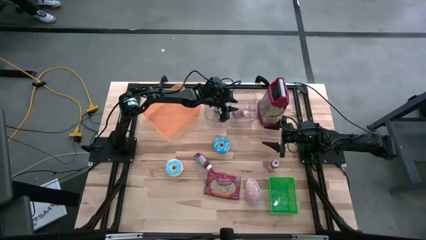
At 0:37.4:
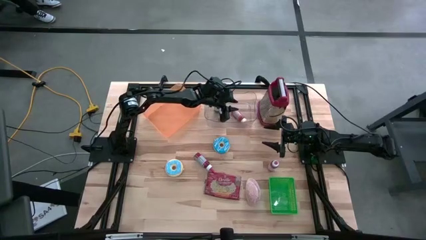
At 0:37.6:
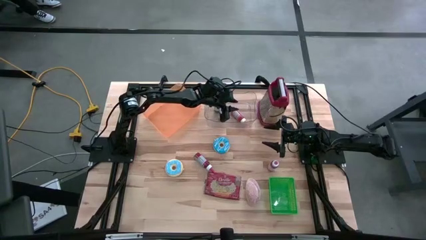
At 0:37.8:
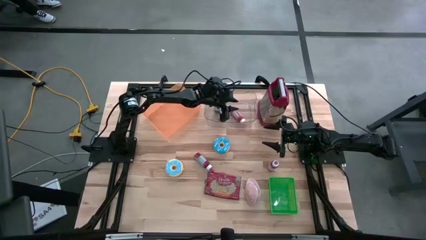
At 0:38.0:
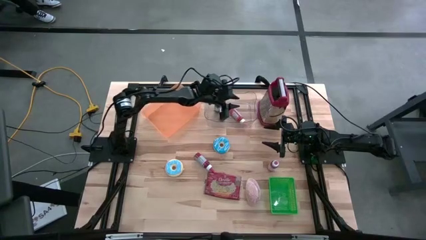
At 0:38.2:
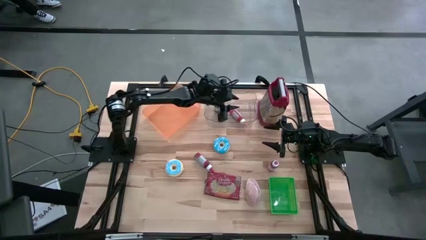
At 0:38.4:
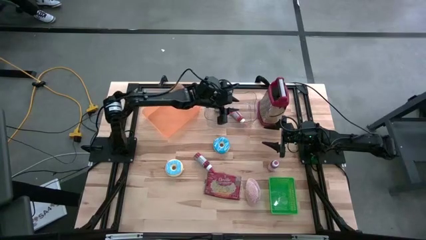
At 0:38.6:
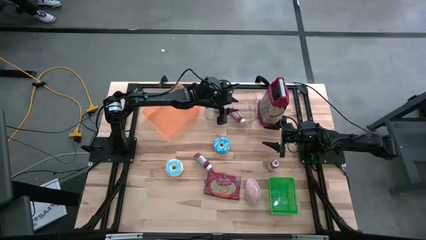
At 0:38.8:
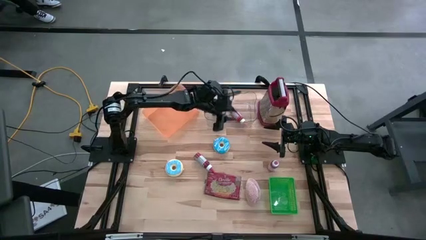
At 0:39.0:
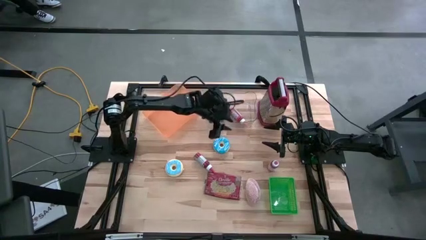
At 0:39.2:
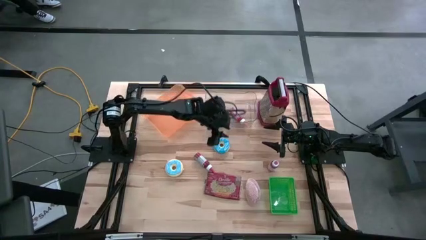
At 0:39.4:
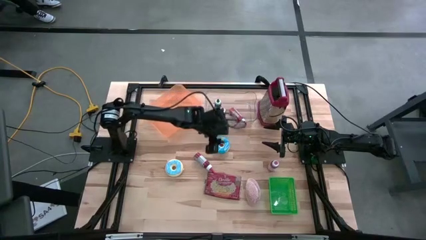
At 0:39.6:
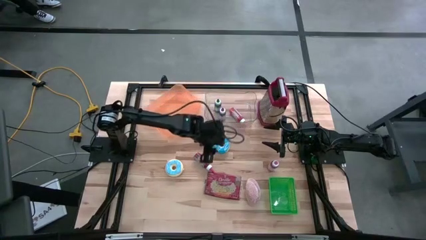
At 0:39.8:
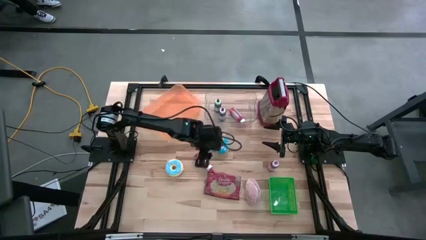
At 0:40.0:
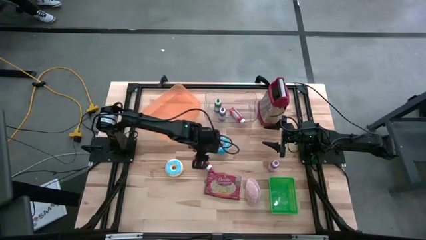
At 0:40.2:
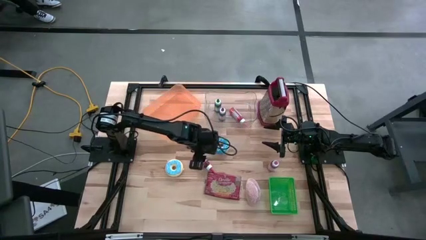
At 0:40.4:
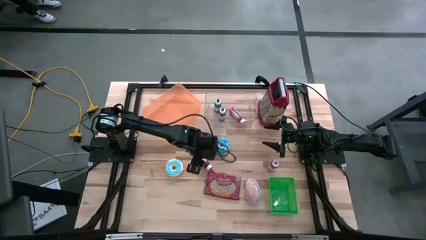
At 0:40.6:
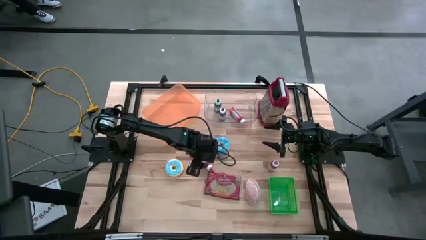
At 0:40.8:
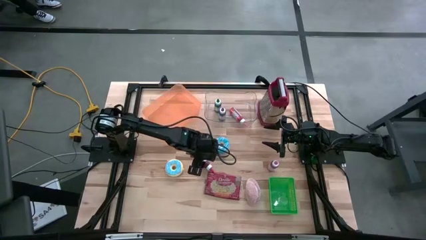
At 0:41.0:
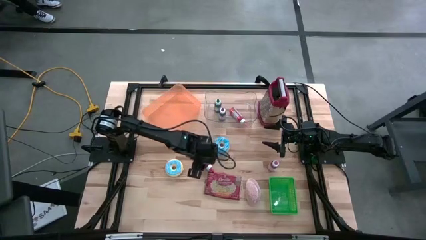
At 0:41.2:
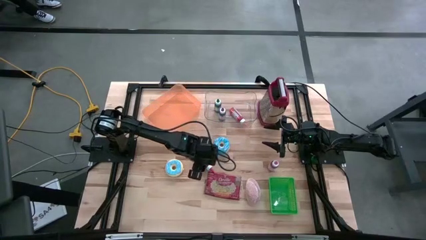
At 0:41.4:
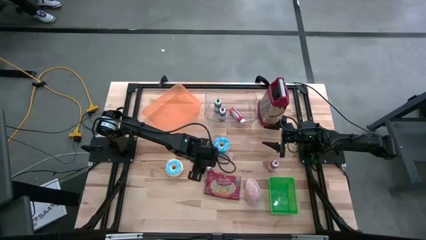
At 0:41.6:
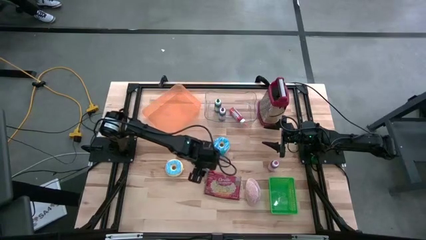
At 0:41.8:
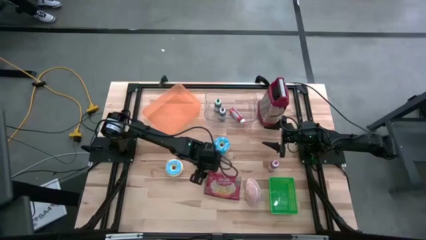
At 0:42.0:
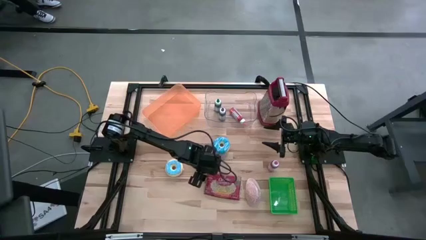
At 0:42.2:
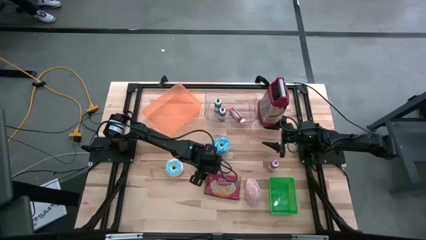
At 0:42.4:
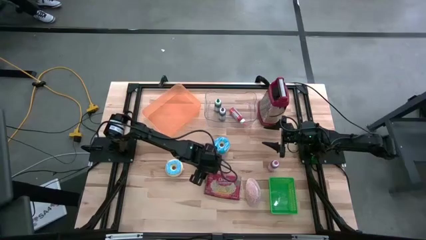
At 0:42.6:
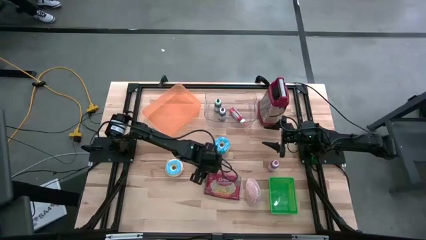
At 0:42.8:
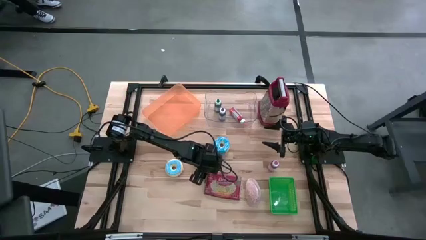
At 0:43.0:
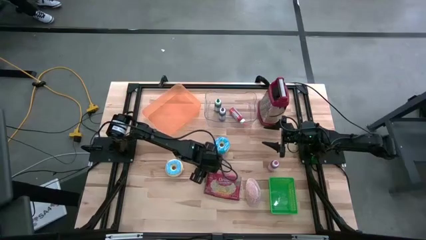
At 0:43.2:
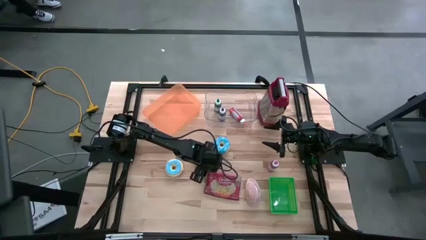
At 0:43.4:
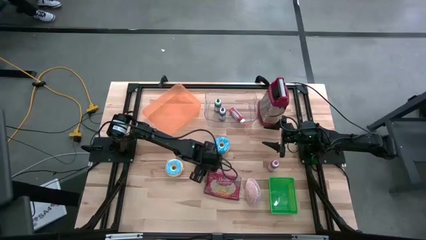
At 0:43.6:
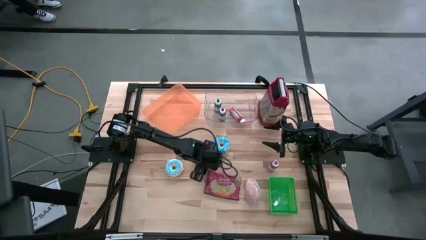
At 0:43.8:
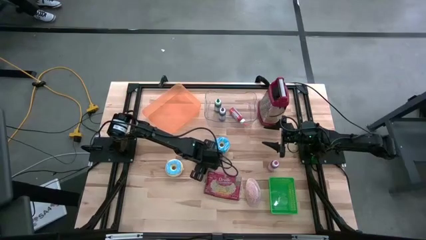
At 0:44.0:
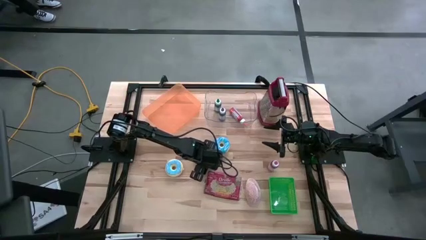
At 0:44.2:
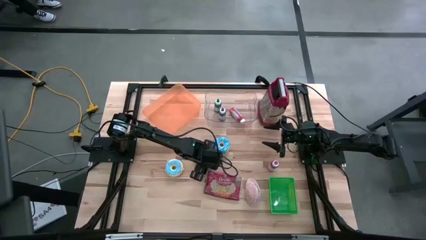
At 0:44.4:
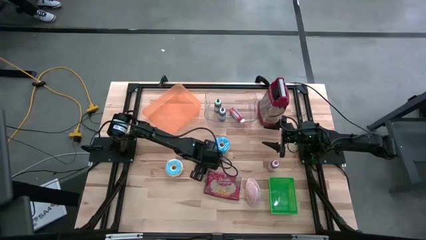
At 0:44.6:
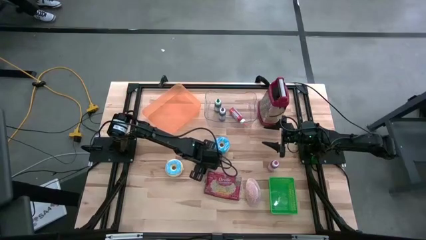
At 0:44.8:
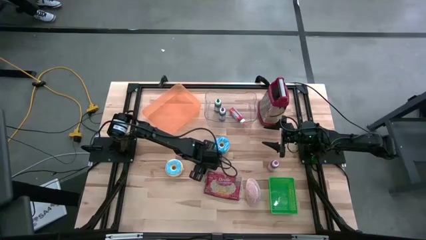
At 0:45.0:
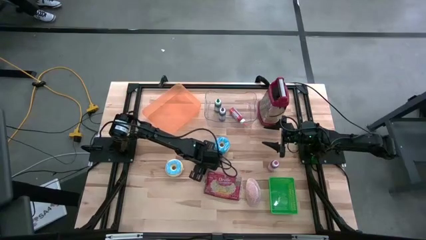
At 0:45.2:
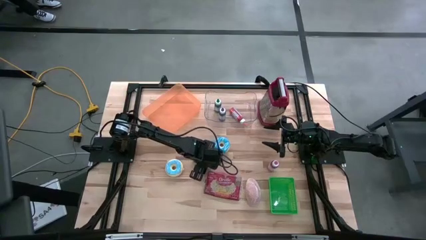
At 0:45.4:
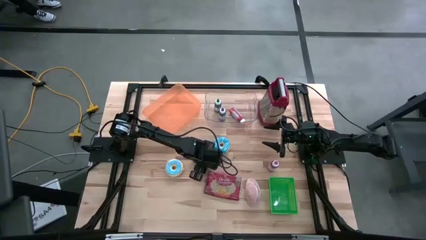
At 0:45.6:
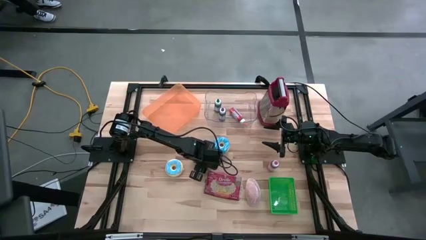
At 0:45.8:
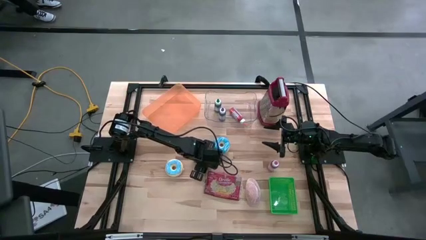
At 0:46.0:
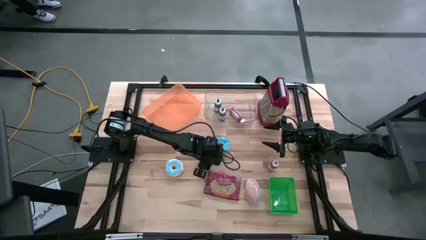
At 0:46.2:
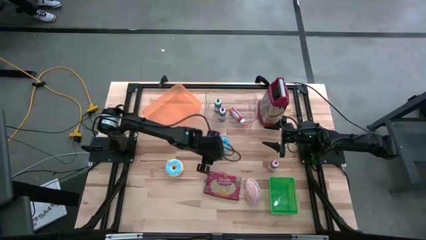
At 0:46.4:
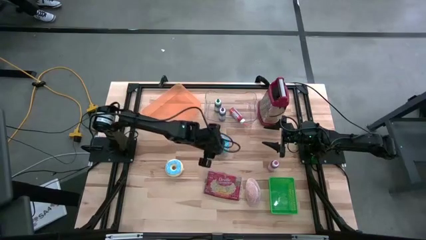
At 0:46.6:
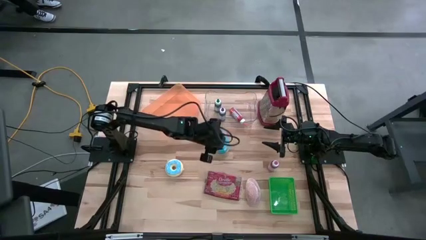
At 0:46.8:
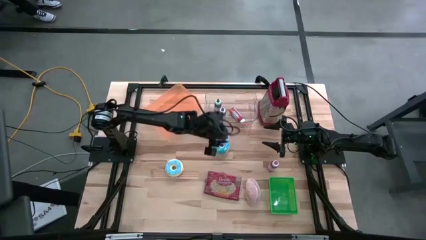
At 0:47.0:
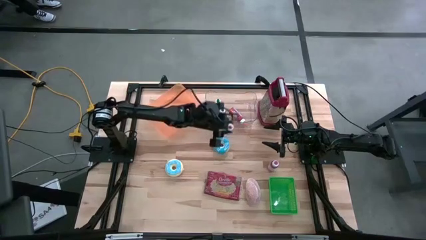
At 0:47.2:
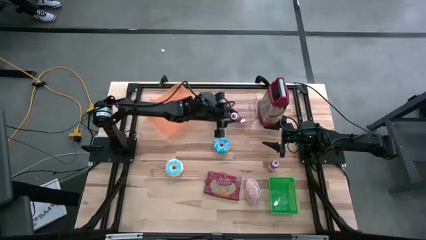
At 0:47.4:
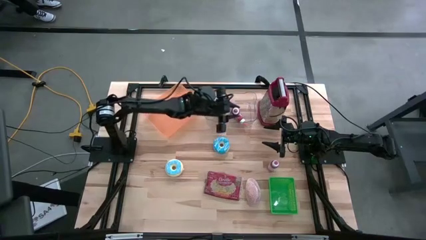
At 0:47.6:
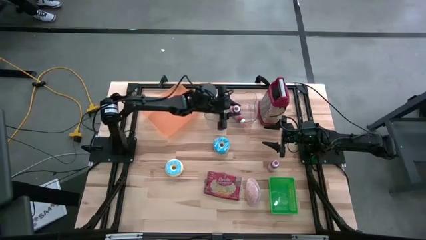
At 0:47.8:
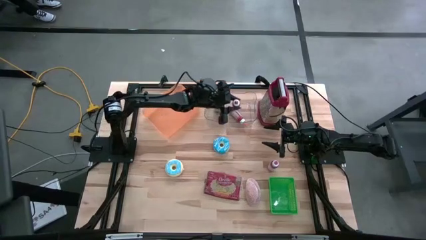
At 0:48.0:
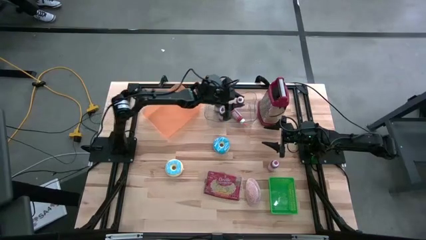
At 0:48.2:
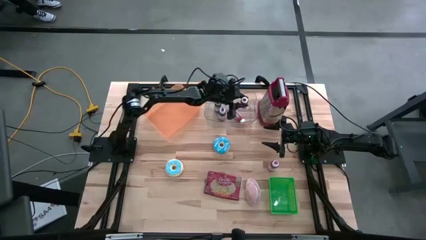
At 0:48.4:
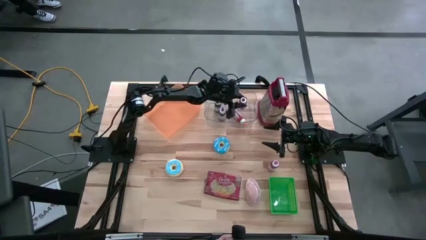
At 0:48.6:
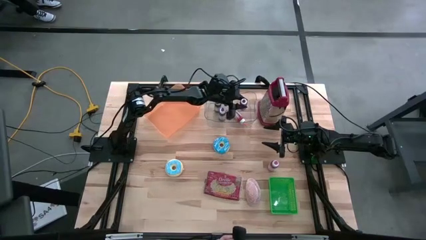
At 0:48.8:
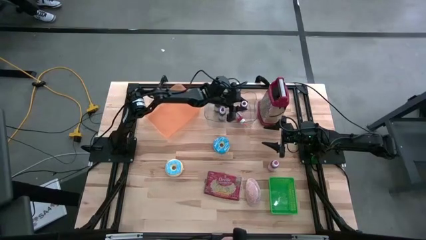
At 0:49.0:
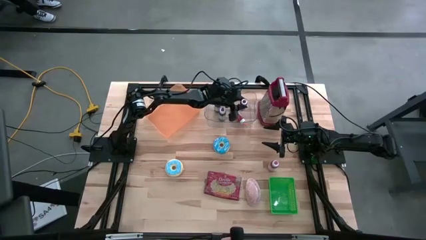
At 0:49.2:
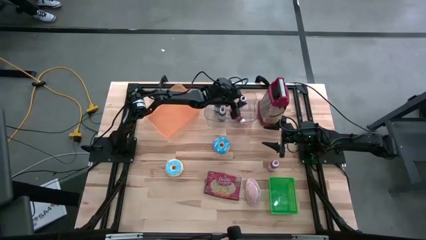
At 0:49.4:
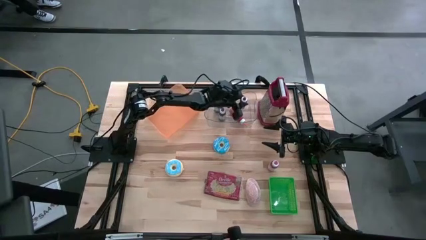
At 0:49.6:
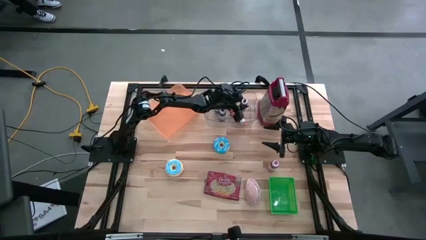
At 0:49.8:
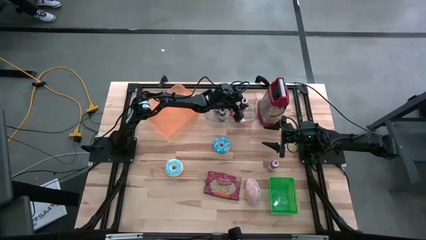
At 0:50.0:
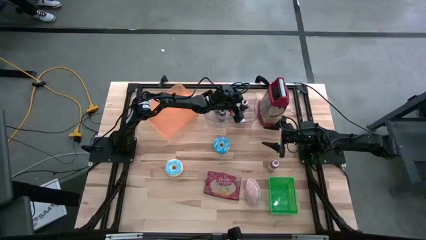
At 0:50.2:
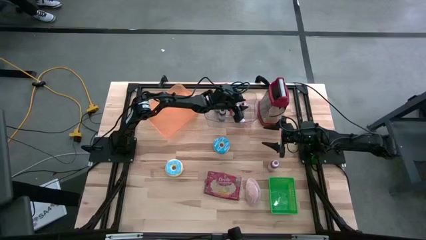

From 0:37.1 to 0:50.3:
Put the red food coloring bottle into the transparent bin

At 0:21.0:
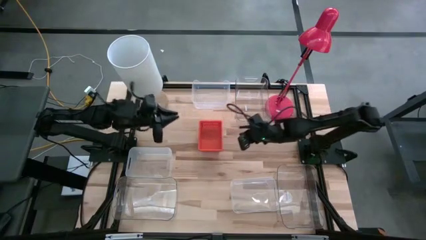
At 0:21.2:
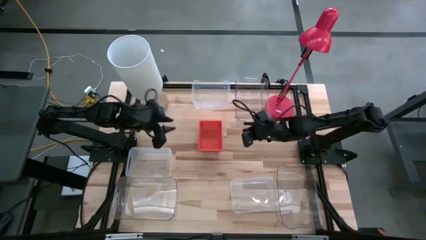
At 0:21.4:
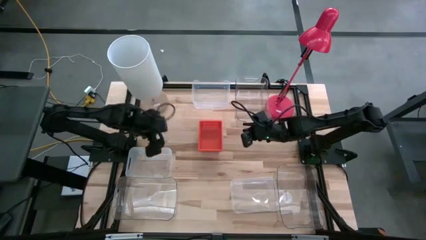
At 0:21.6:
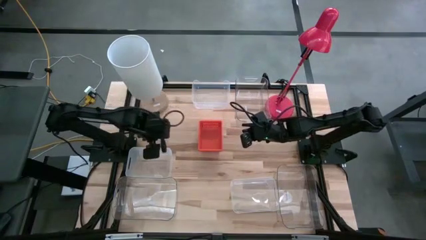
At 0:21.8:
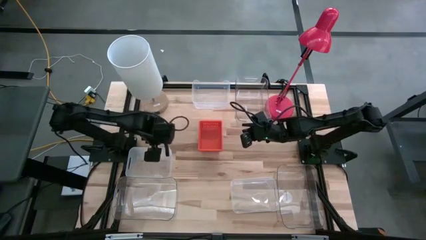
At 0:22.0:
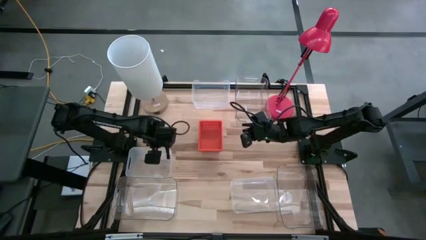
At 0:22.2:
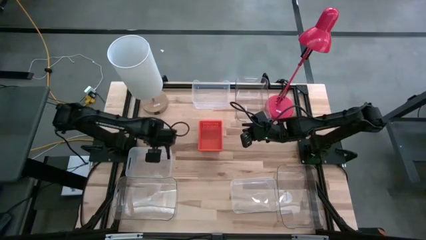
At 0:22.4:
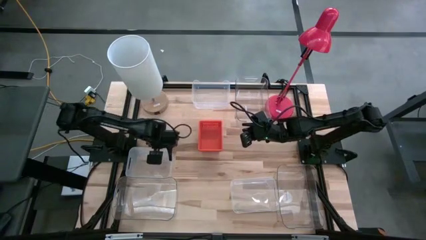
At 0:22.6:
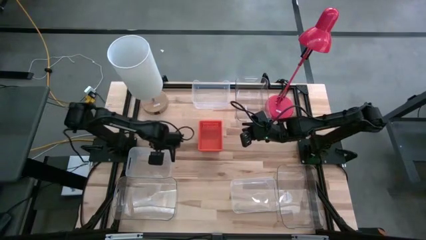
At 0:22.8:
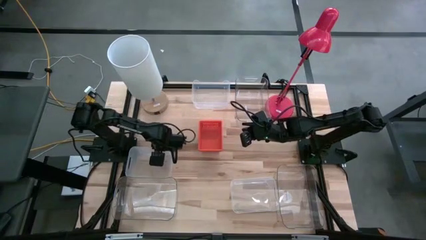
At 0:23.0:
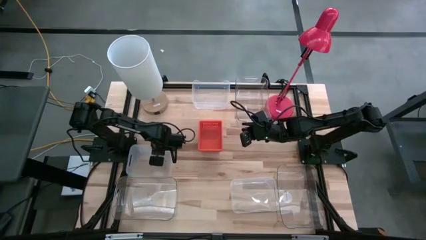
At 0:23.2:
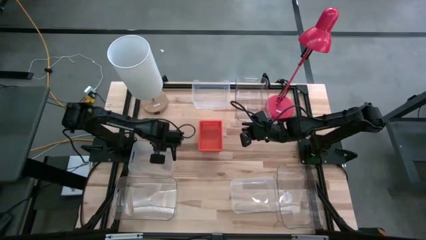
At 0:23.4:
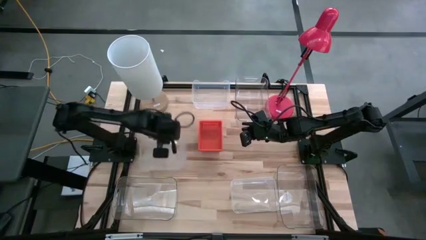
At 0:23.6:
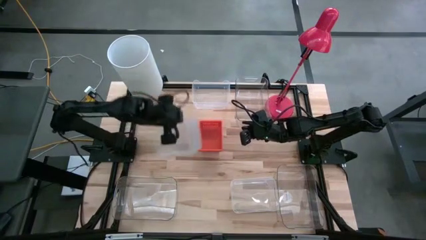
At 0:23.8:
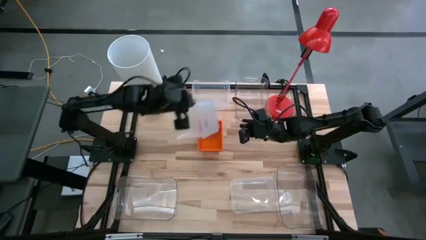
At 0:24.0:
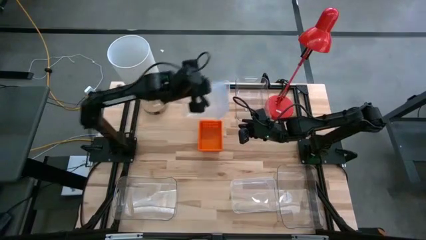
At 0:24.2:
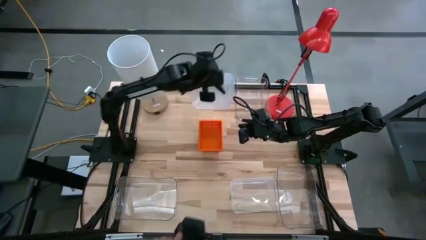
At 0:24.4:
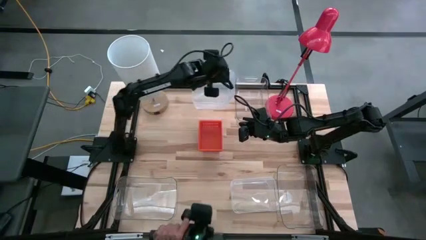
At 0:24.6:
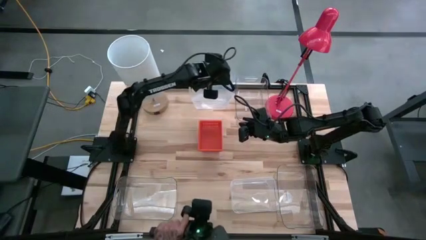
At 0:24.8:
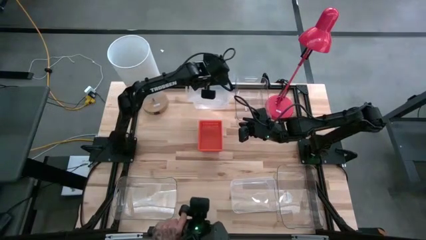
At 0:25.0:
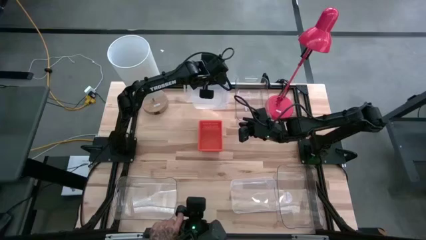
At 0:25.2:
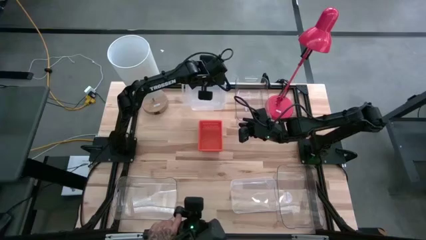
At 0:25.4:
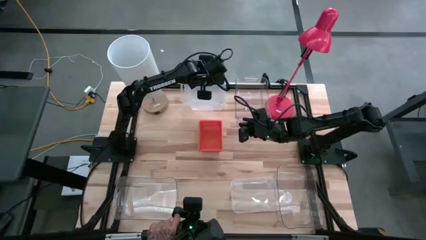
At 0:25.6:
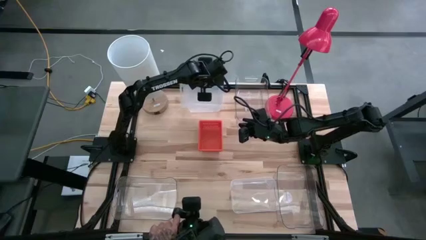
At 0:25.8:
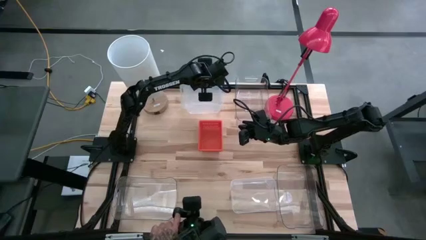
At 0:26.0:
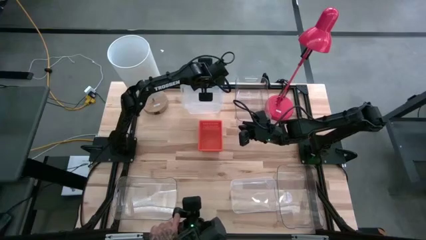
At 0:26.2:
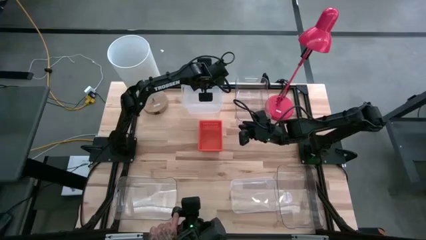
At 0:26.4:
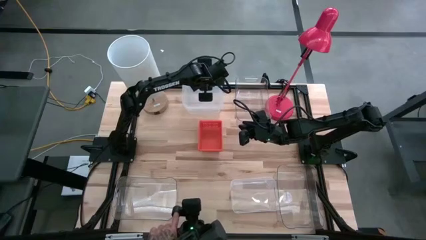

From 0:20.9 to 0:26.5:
Stack the middle left white bin on the top white bin
